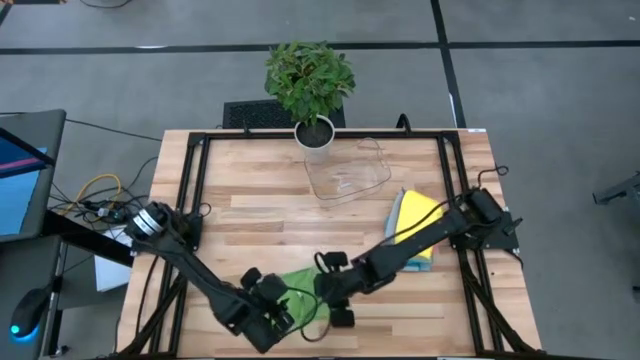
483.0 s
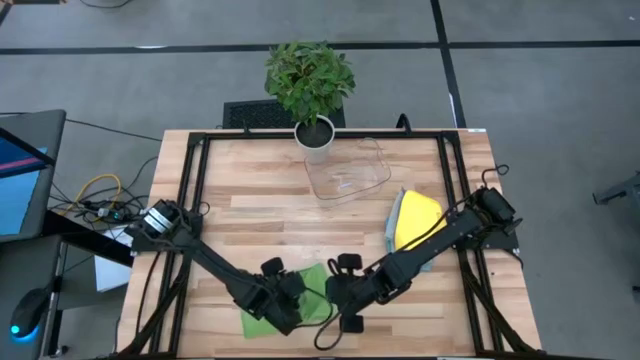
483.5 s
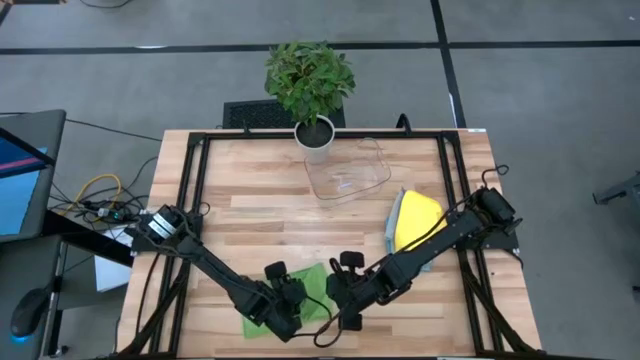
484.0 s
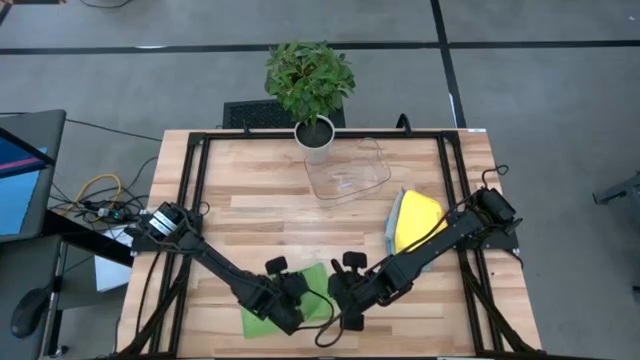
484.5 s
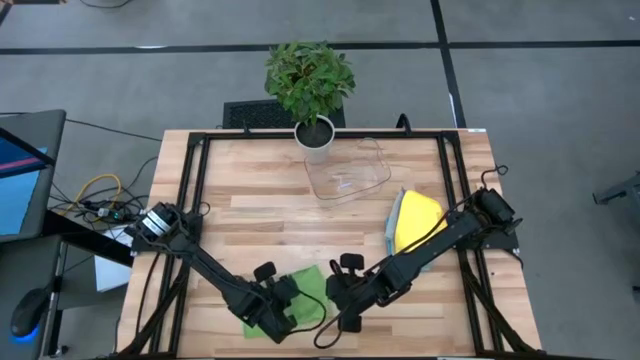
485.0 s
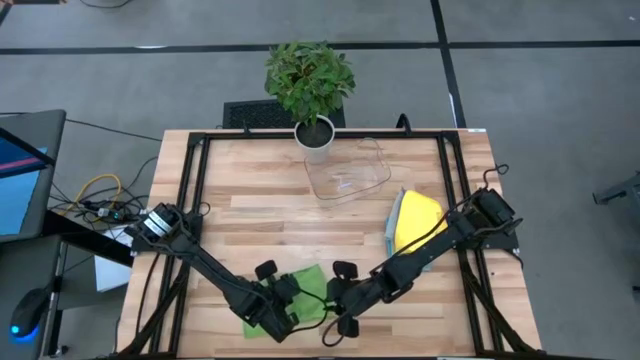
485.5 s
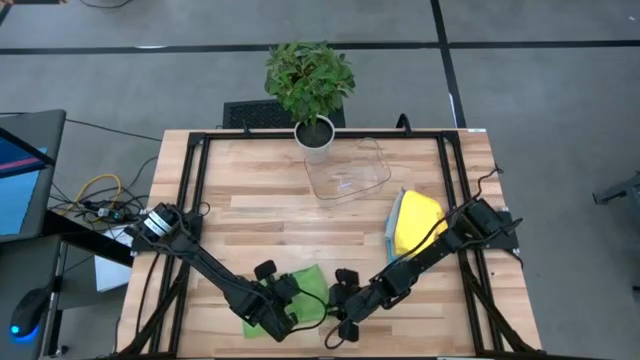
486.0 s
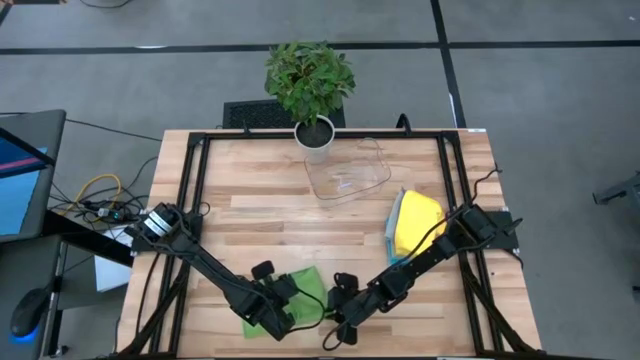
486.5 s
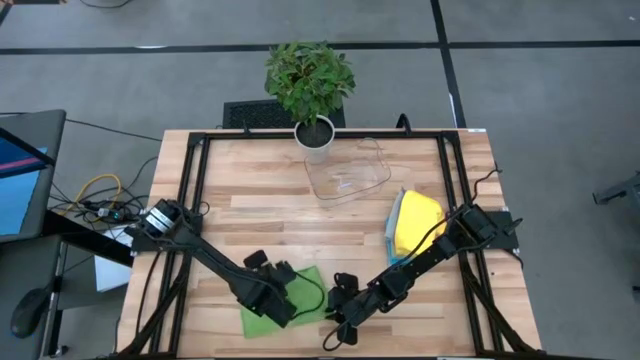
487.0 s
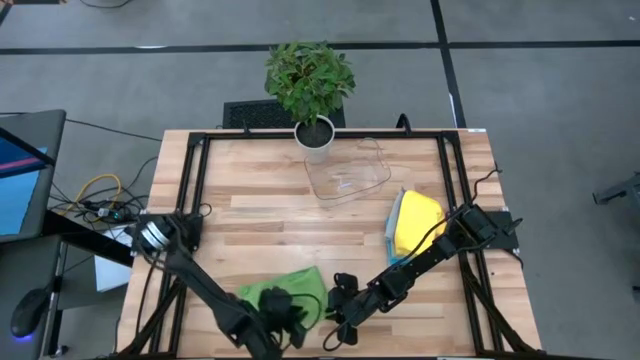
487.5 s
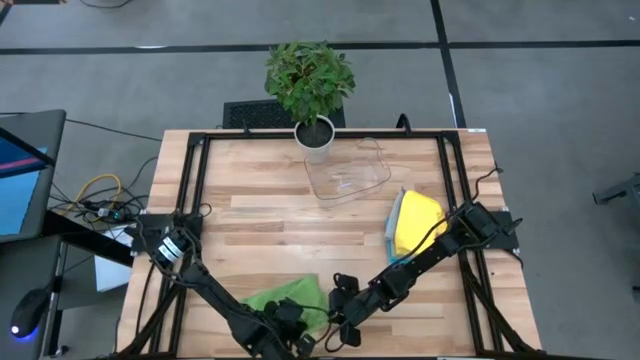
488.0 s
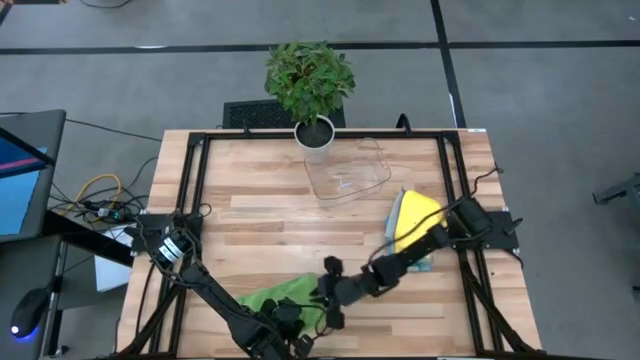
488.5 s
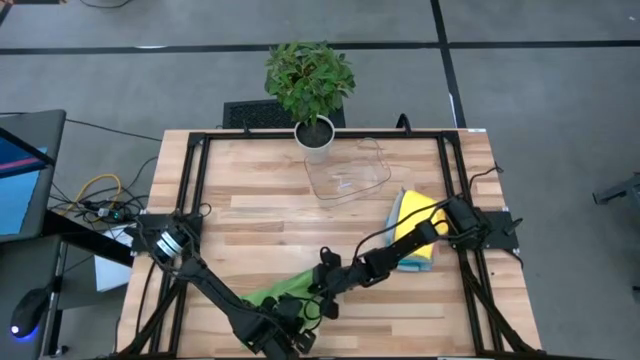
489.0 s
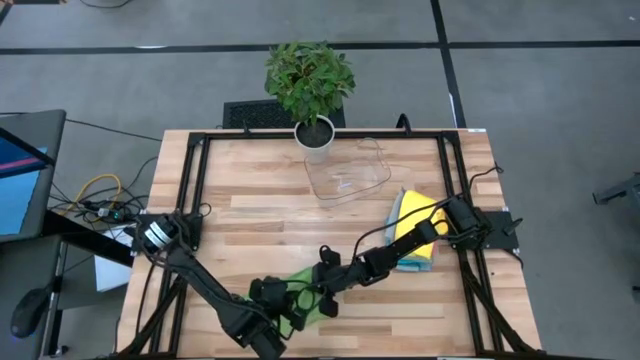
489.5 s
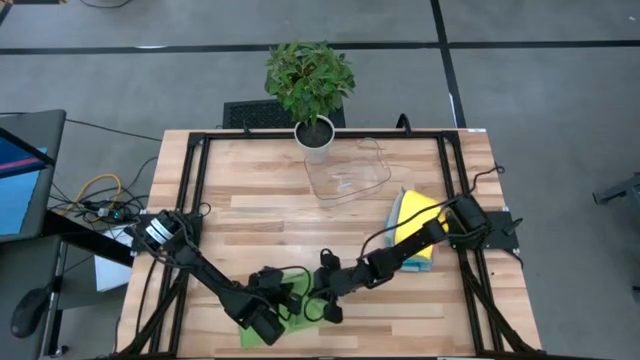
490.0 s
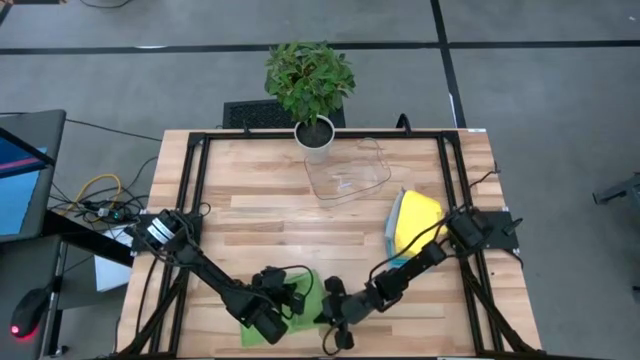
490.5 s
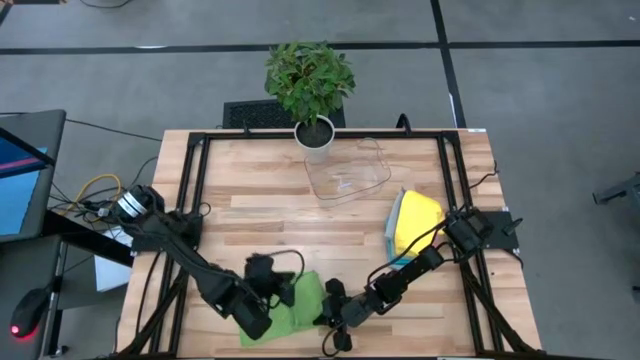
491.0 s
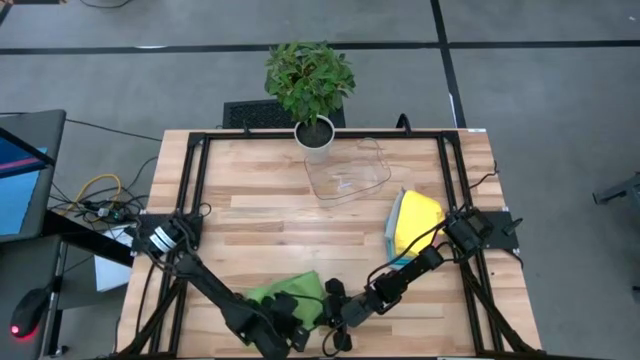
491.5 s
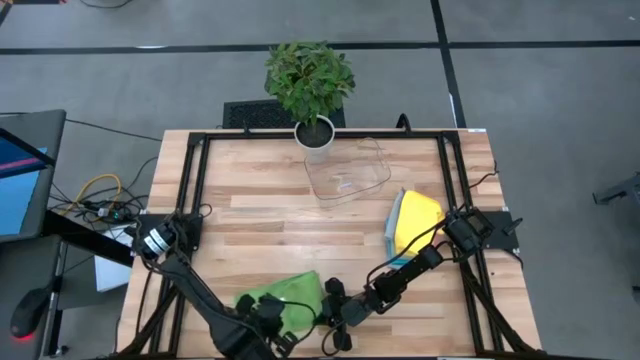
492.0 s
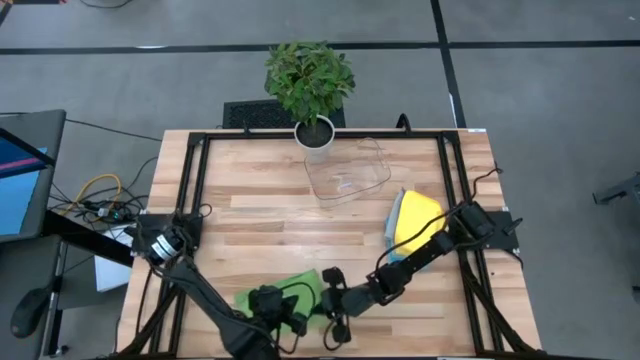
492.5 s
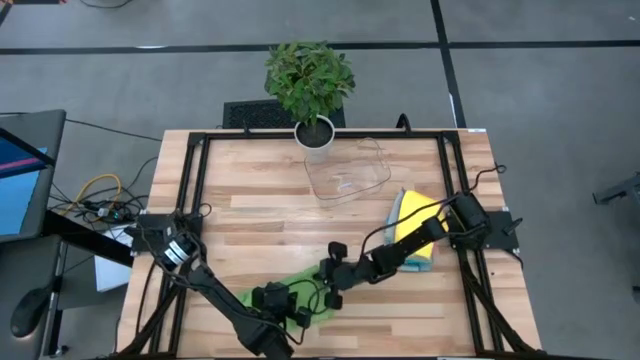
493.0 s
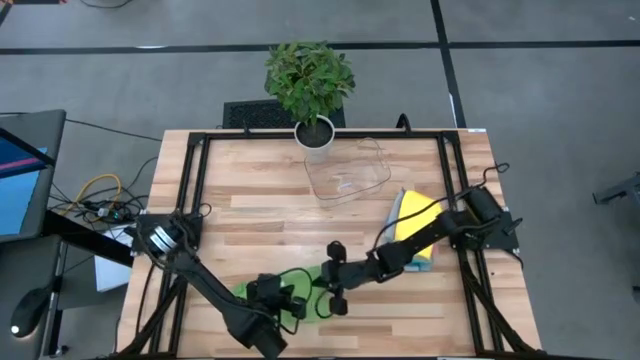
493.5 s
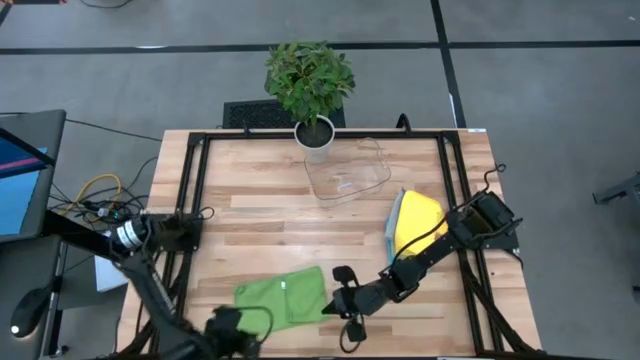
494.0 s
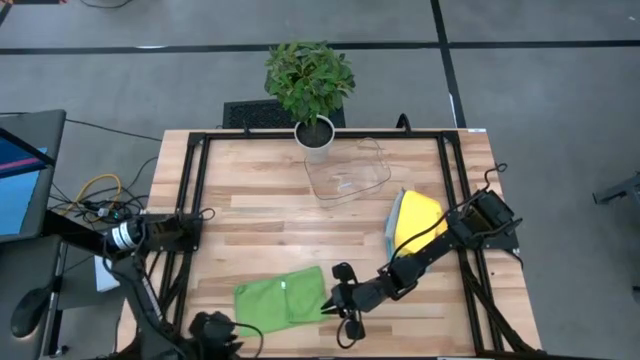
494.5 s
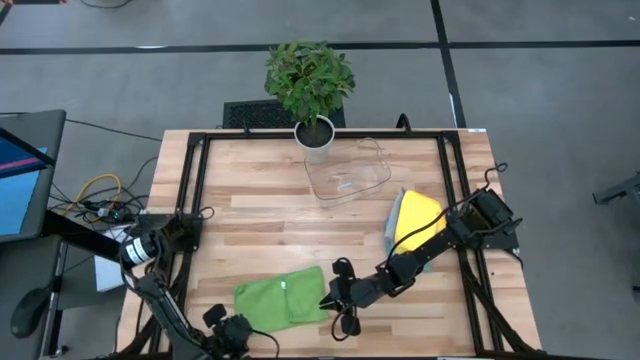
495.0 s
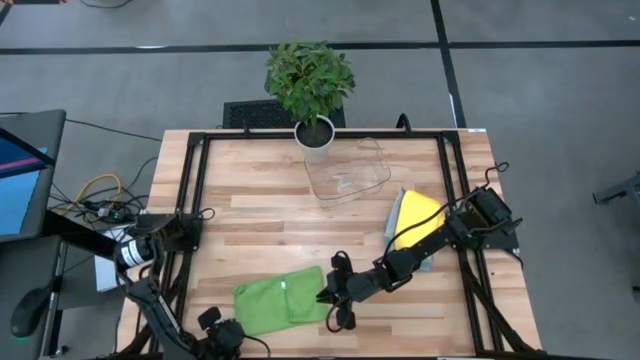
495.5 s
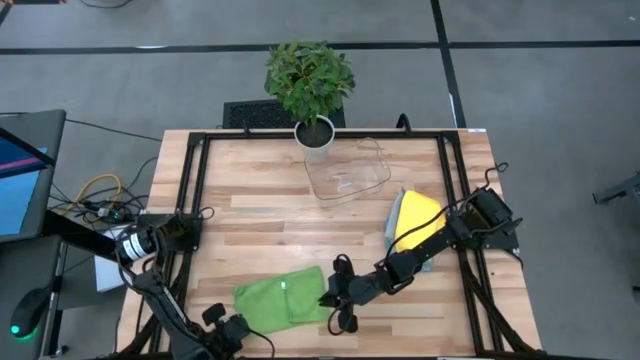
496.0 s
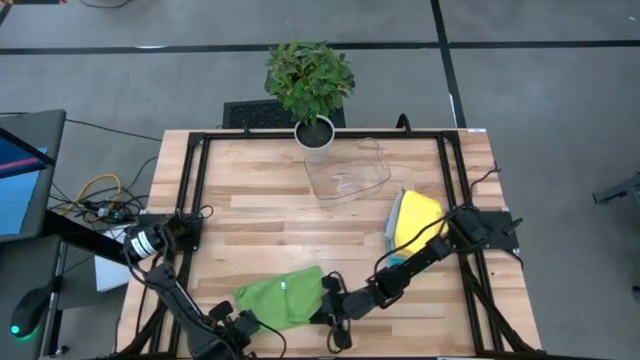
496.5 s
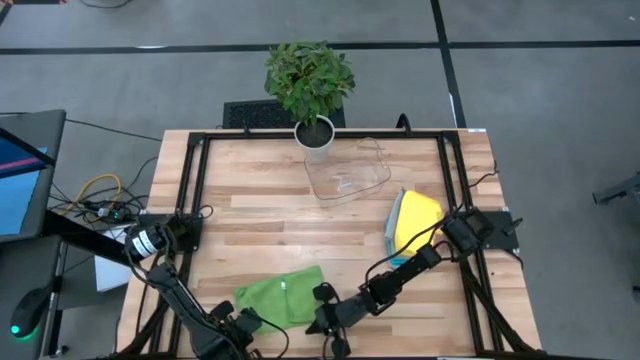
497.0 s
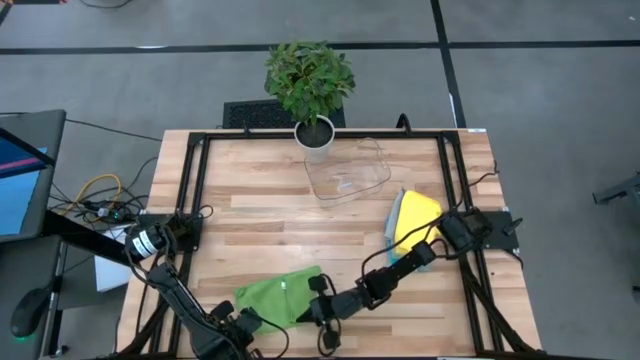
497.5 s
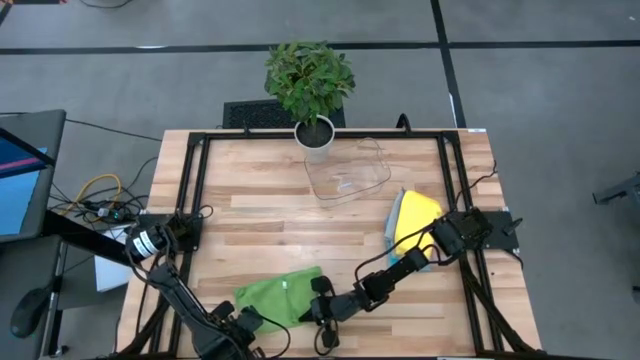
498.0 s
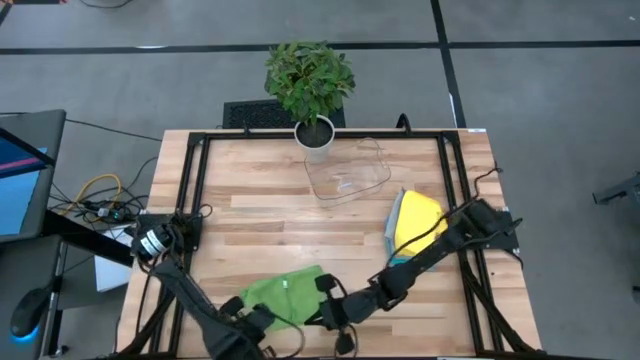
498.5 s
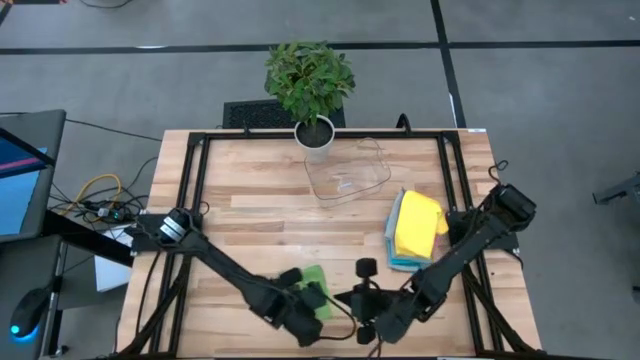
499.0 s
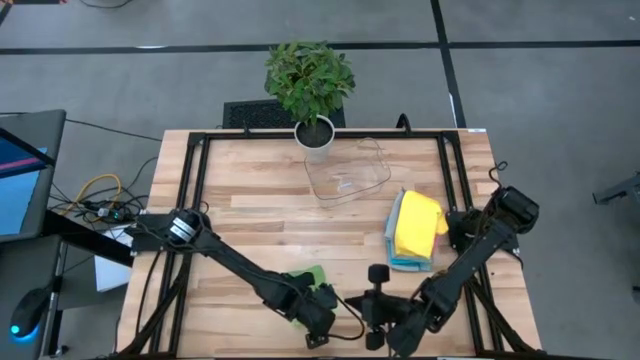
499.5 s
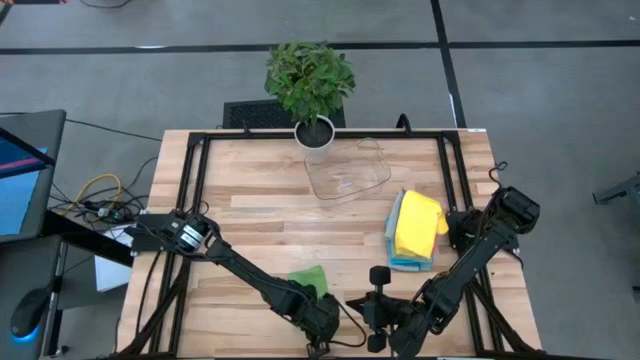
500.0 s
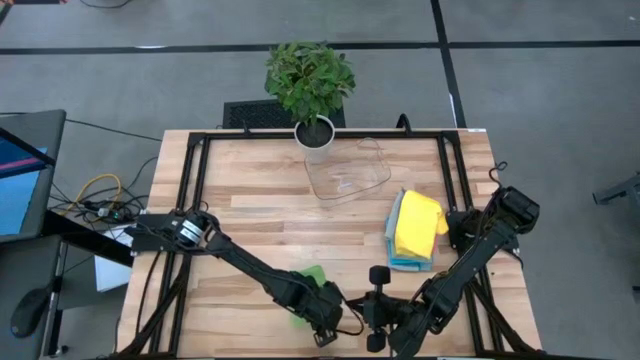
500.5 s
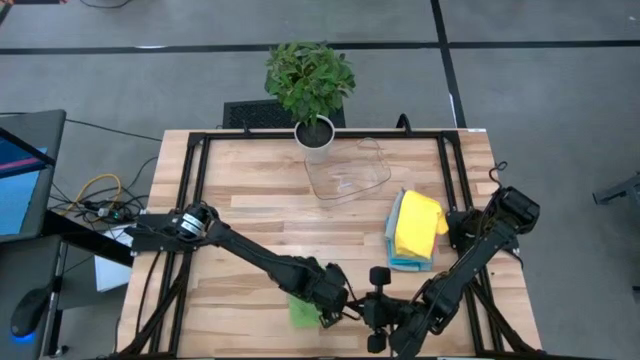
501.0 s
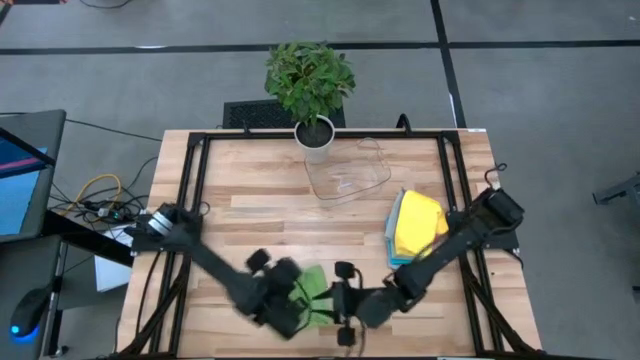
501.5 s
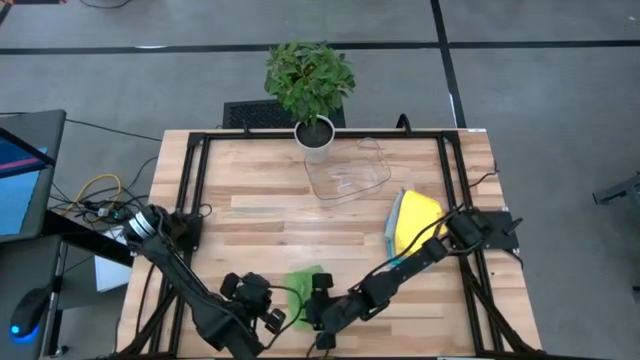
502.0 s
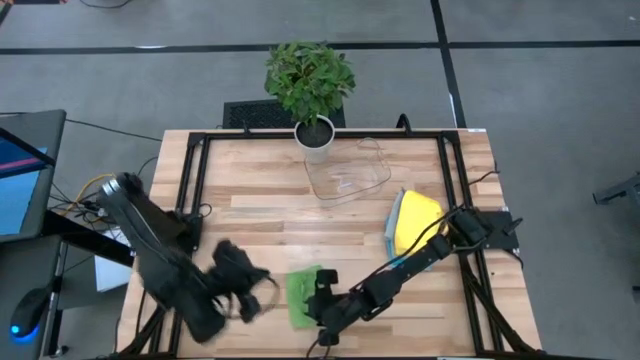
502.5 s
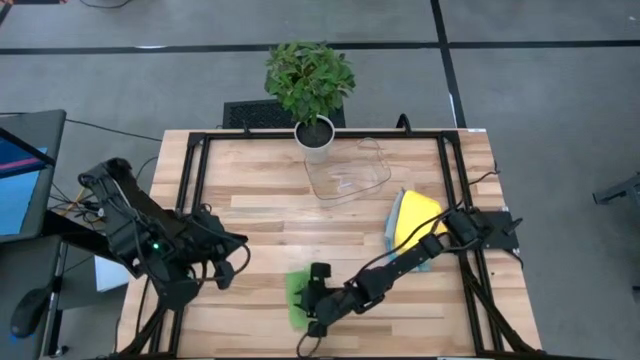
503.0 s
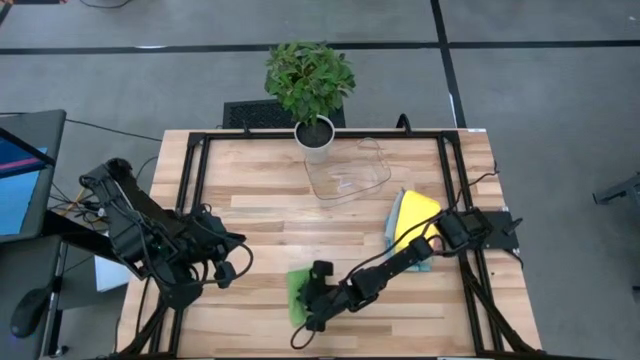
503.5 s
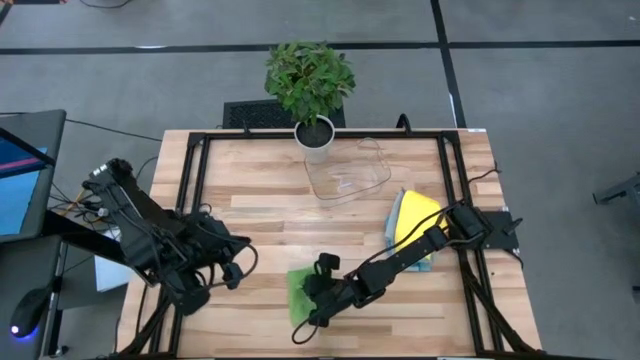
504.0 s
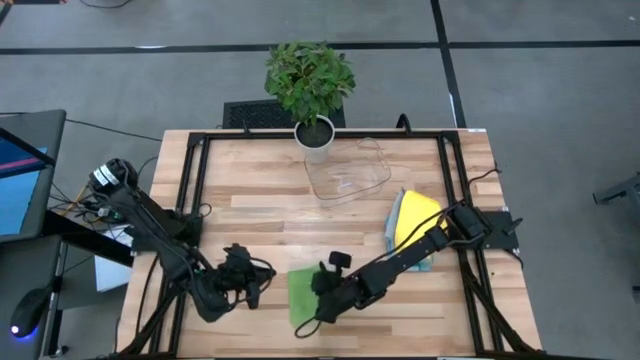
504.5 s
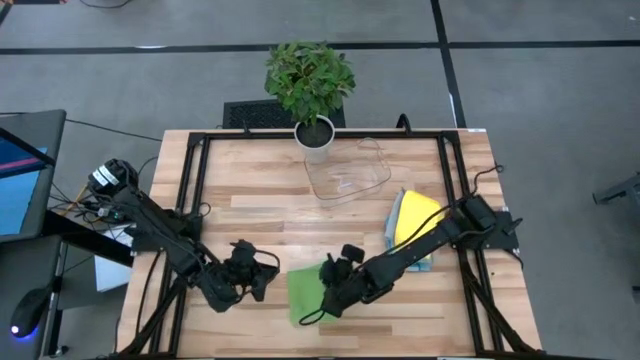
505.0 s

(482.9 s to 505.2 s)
Task: Fold microfiber towels
Fold the green microfiber cloth
